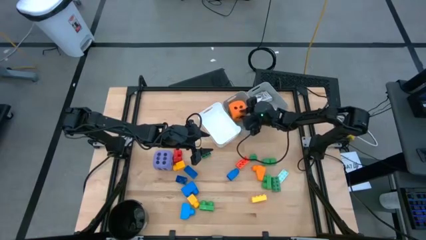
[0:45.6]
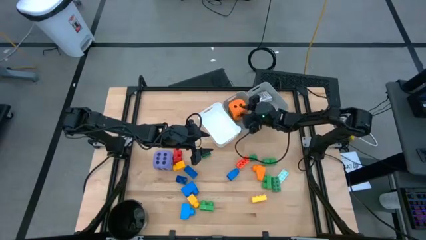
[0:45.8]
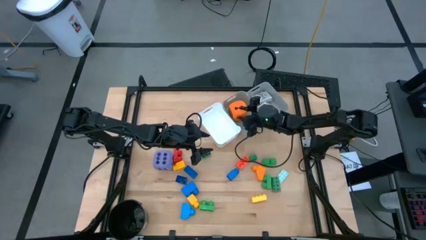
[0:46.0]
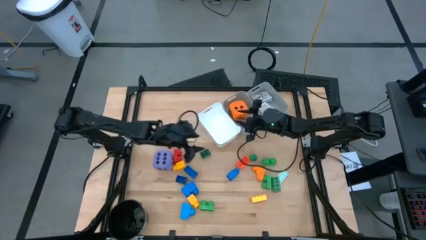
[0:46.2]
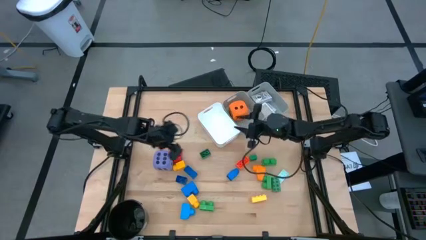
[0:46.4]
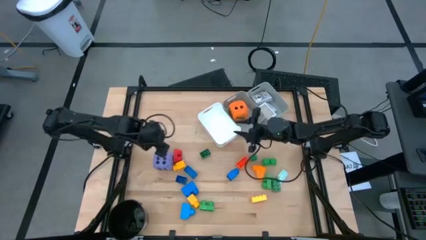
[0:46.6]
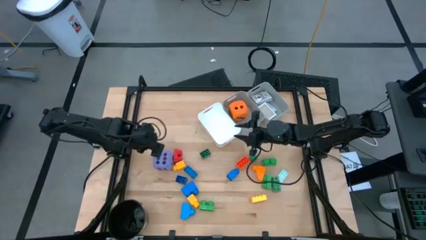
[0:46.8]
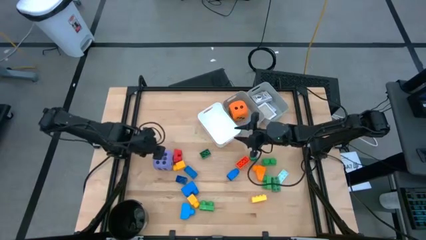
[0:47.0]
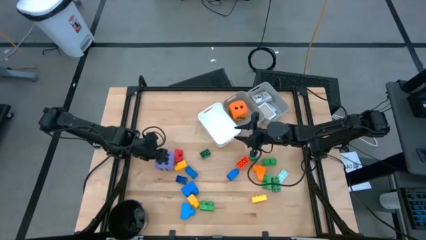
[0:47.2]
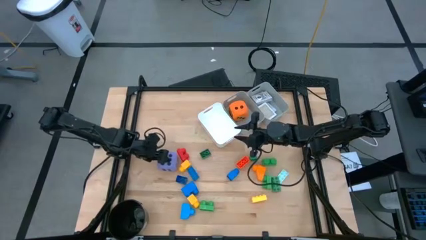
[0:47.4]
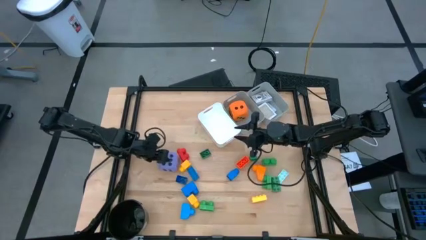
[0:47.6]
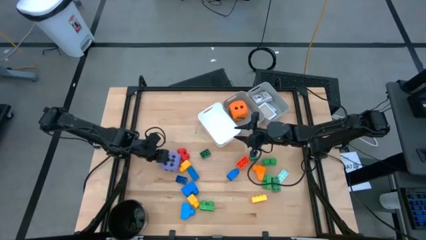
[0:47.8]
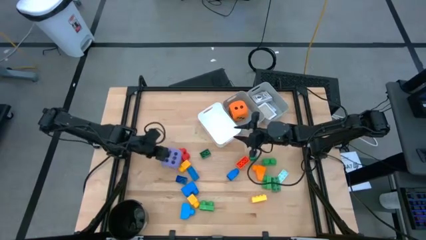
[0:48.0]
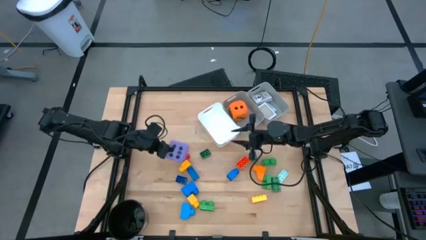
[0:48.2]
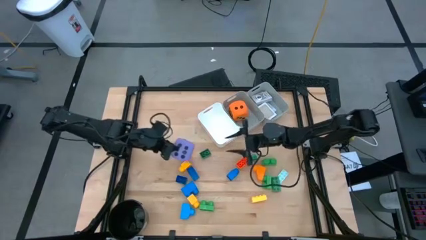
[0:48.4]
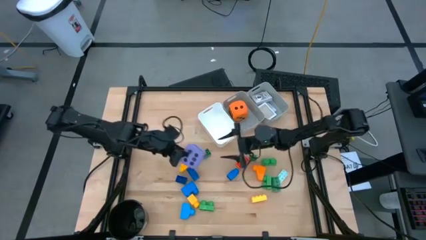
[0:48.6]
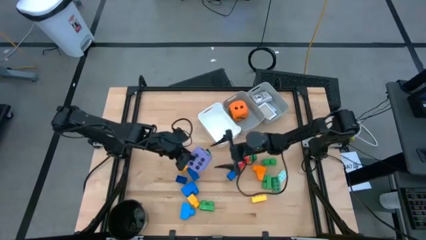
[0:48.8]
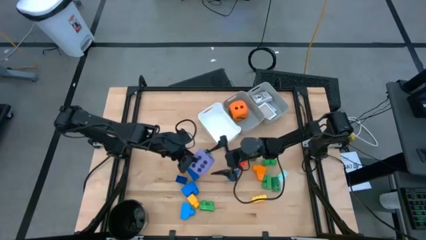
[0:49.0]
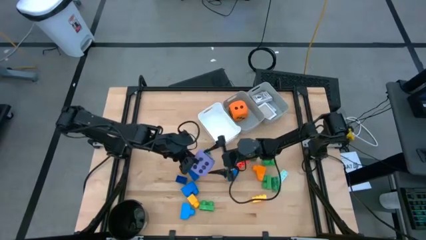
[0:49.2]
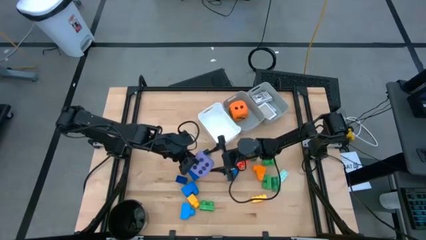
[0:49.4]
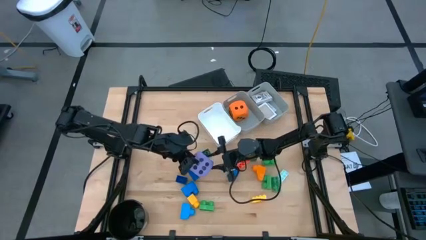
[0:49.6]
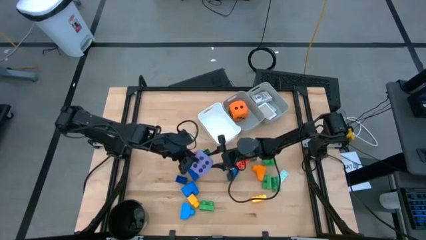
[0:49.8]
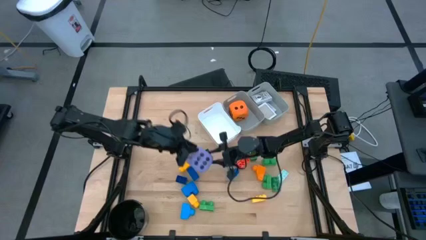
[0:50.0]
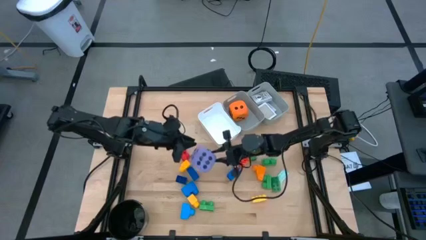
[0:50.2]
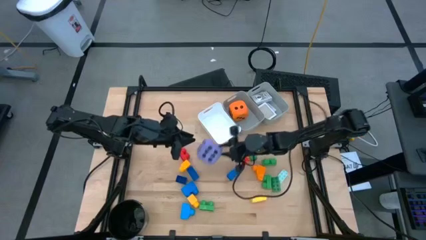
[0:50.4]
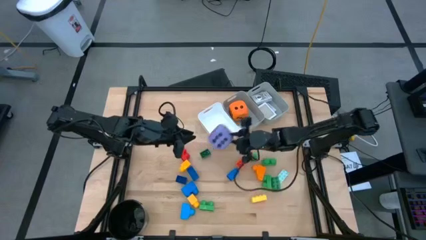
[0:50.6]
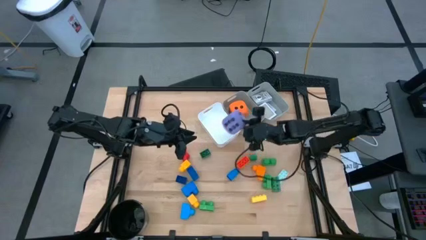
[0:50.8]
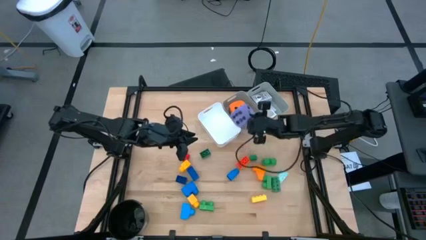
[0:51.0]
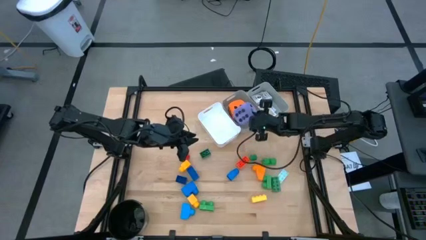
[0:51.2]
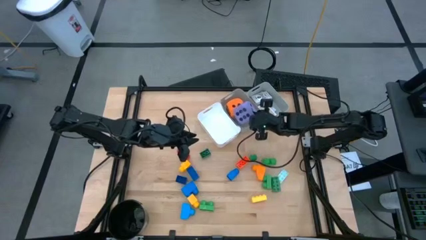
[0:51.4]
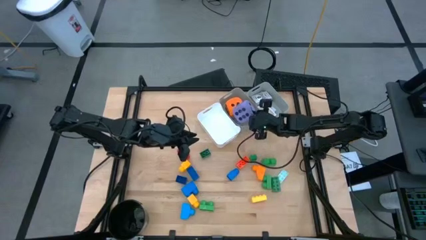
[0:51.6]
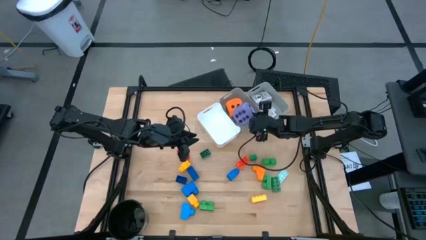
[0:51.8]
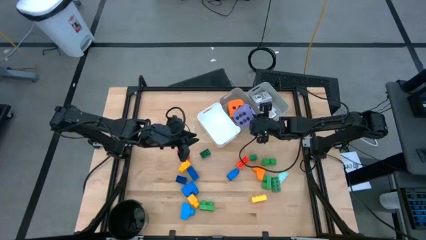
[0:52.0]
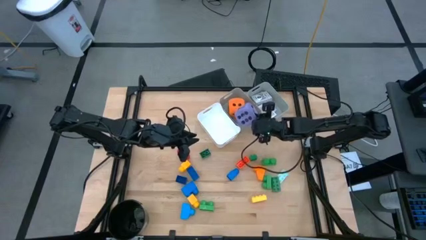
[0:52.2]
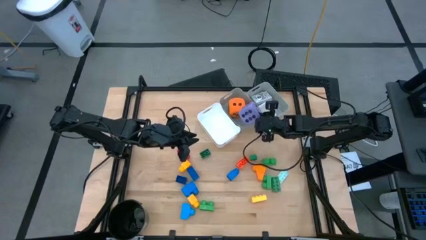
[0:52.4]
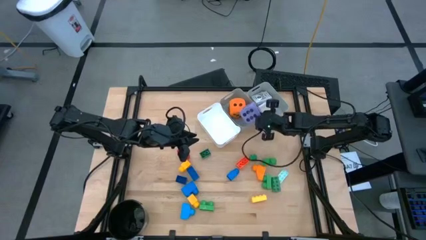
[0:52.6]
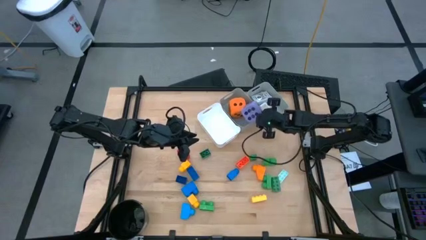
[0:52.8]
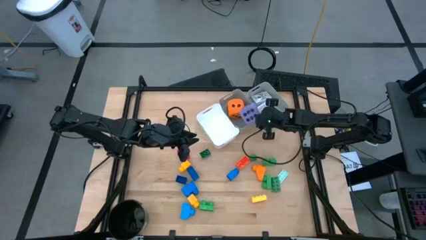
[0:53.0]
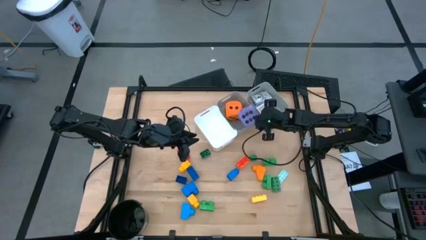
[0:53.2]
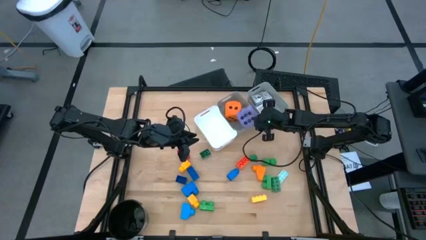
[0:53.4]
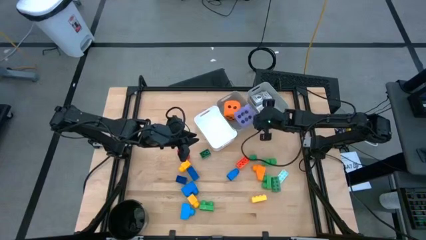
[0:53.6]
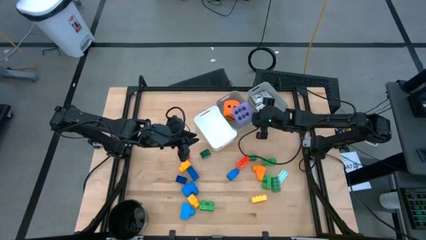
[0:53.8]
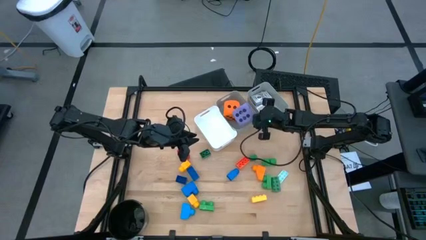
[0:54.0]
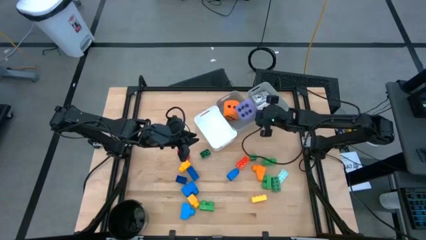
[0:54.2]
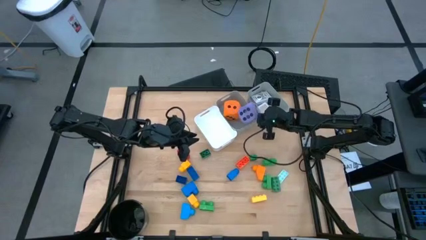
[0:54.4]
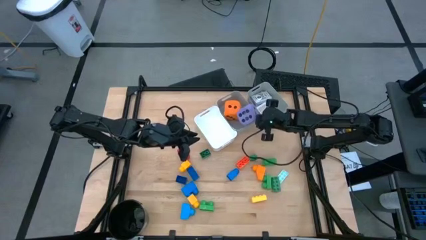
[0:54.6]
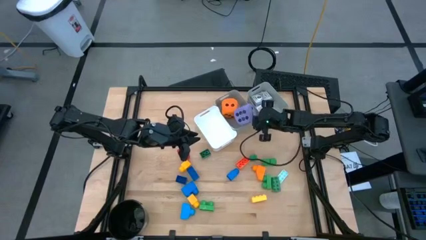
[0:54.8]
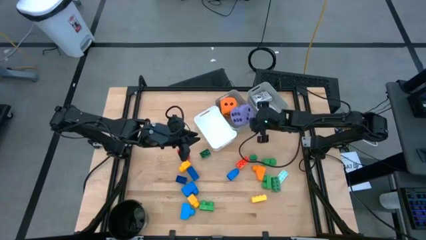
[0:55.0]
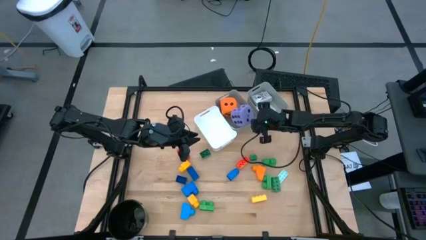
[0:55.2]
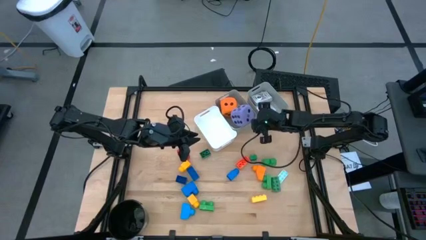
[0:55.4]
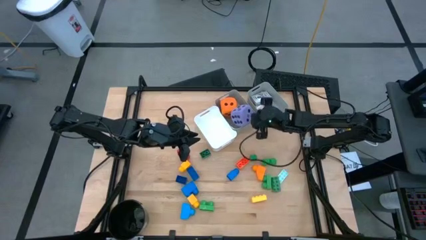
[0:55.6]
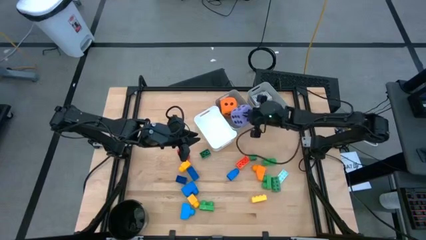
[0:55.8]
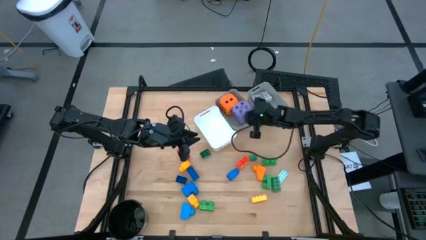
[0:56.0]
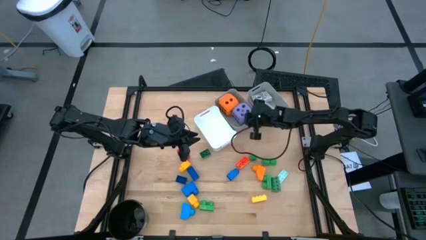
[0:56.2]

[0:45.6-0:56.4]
Task: Pick & Place Toys
Put the purple dice into the left grey bin

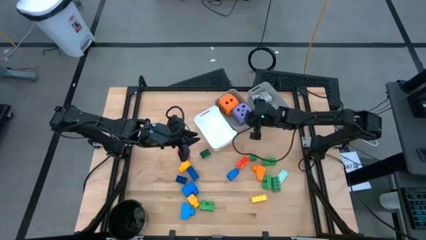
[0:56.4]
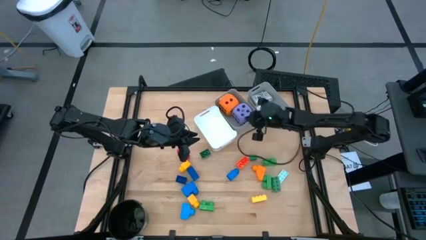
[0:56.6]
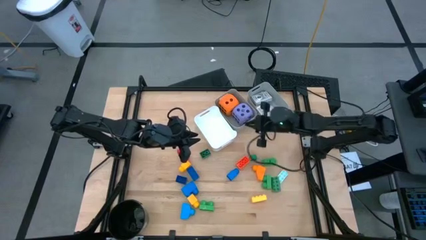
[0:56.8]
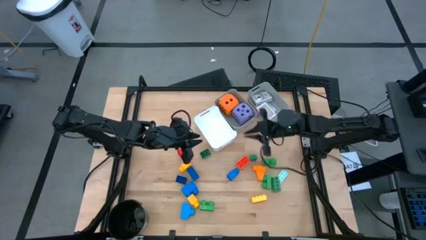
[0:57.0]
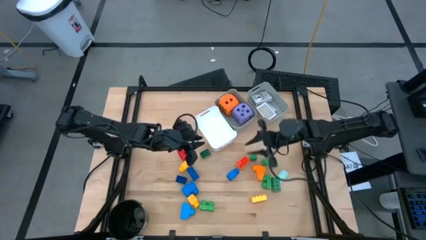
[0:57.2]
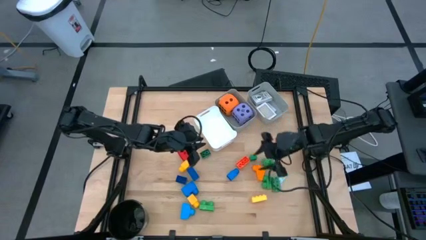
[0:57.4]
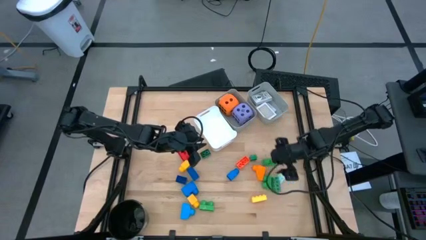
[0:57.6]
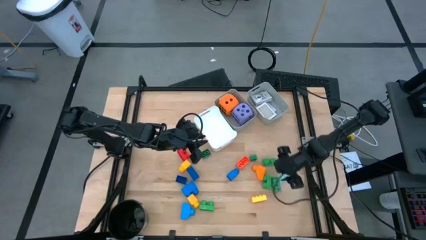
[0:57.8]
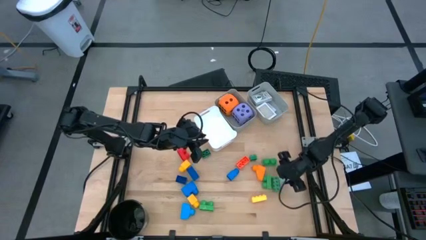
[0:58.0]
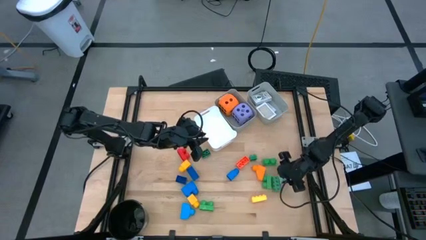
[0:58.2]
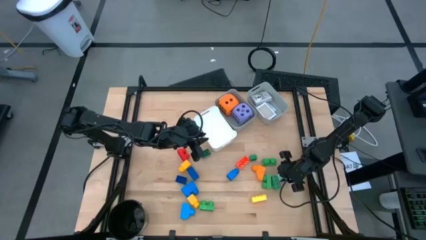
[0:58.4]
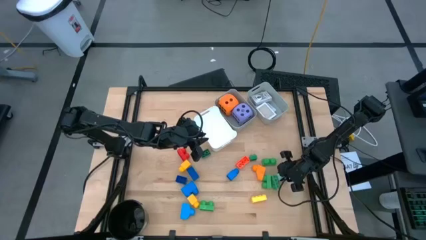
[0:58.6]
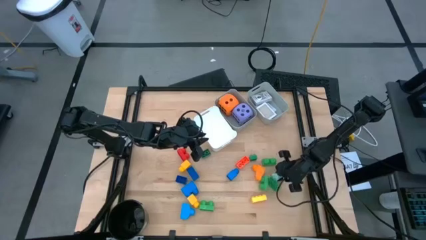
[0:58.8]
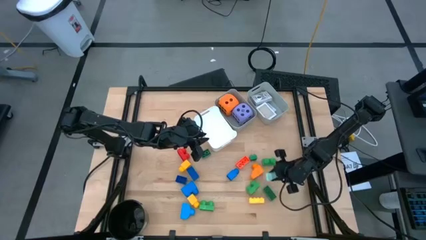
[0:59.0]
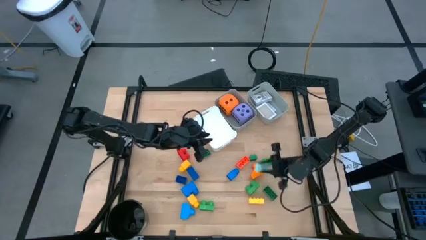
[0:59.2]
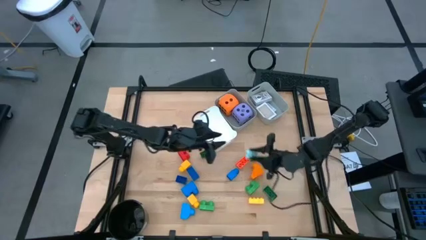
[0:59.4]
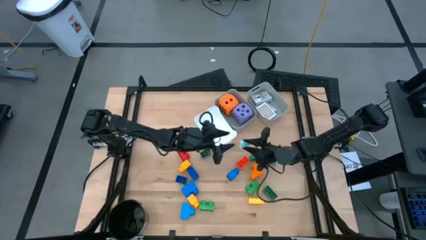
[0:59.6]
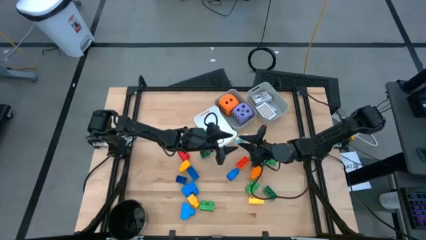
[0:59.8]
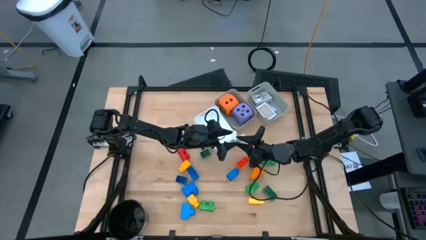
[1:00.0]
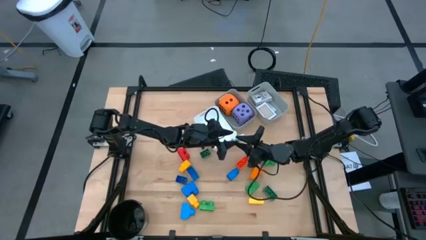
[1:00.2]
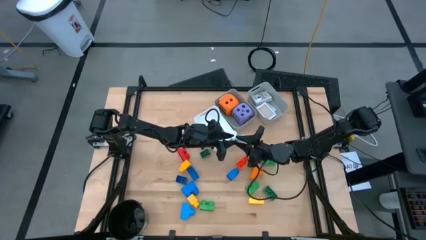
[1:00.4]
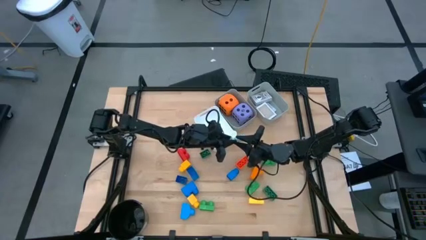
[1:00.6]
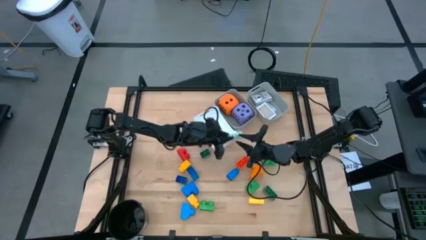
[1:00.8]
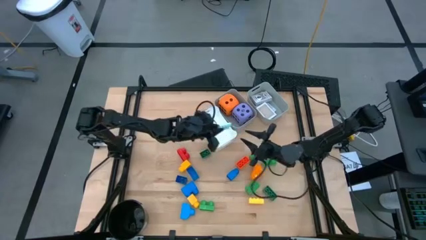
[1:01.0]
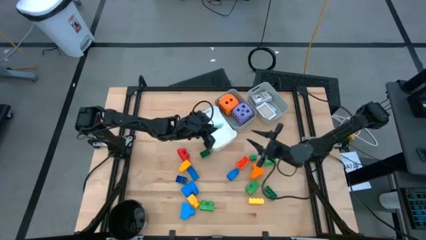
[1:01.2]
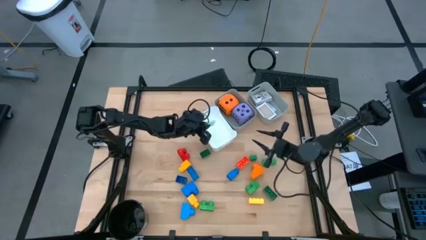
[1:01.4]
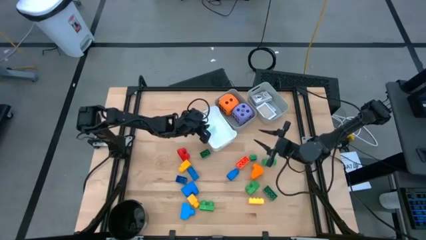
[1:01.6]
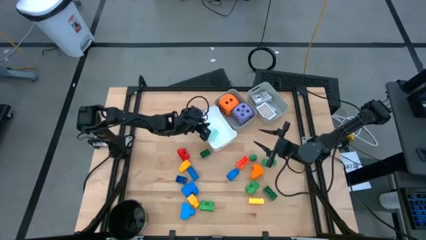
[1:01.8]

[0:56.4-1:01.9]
Put the light green game piece into the white bin
